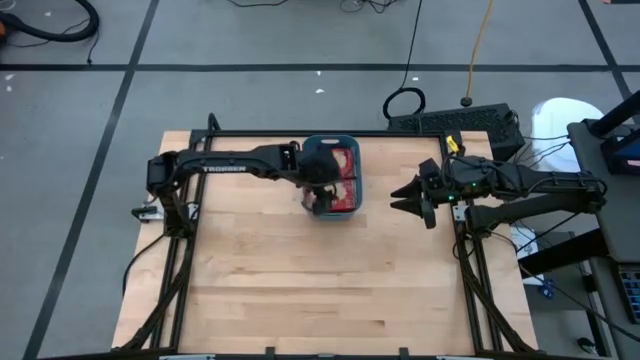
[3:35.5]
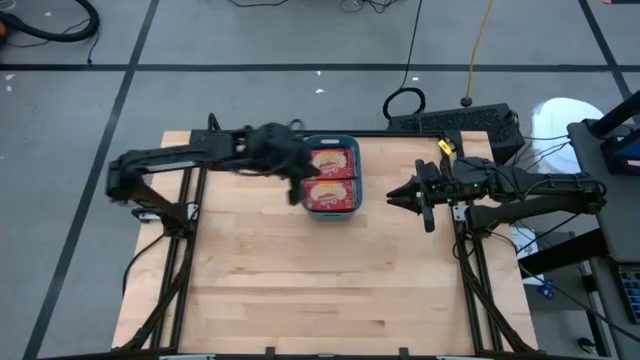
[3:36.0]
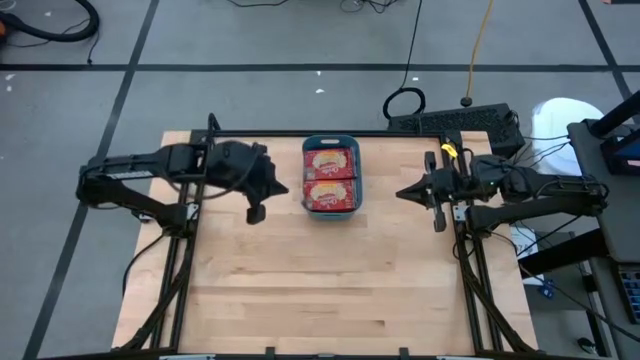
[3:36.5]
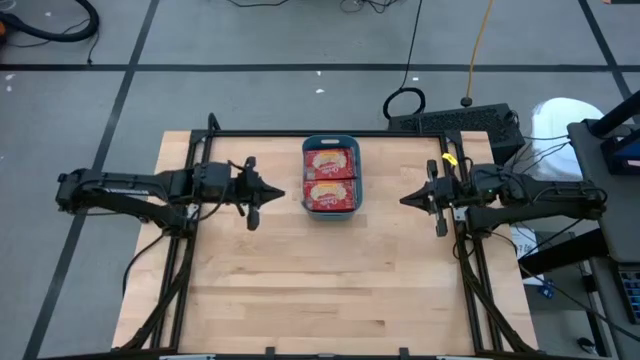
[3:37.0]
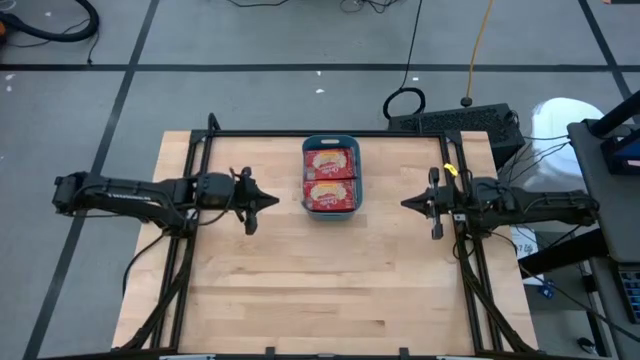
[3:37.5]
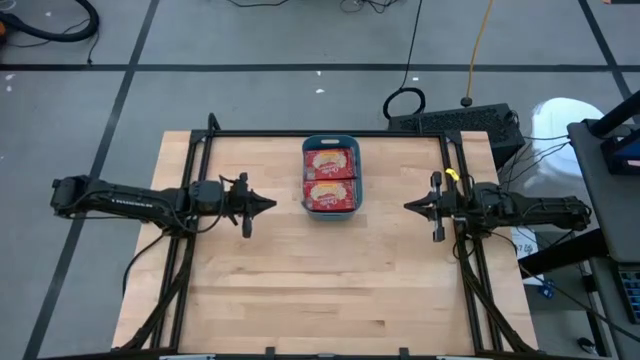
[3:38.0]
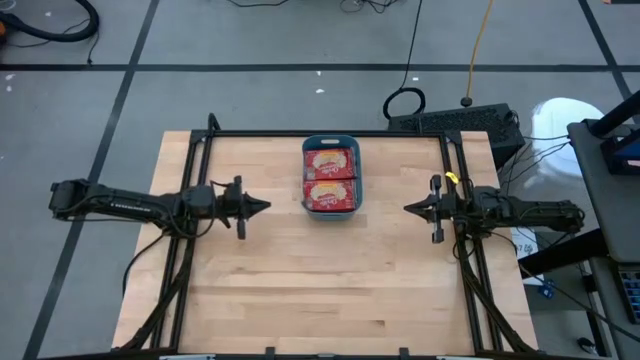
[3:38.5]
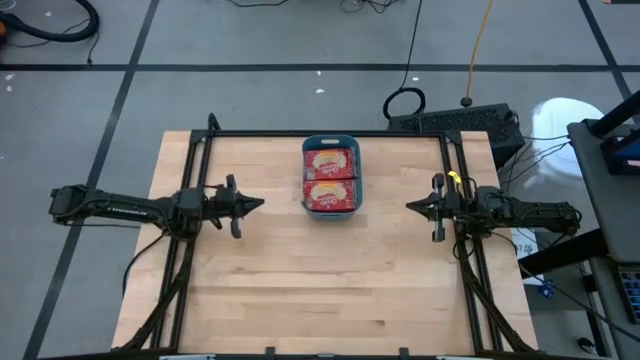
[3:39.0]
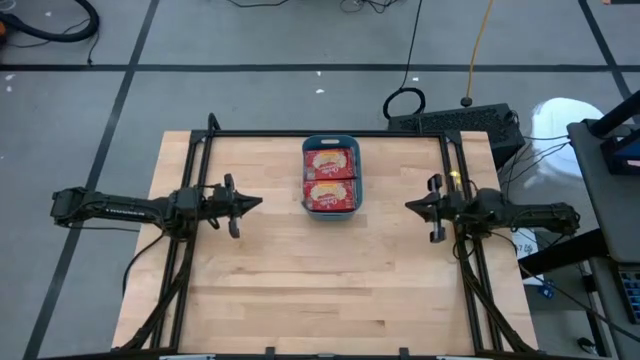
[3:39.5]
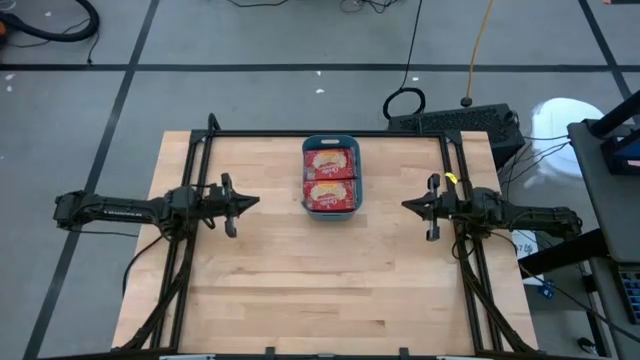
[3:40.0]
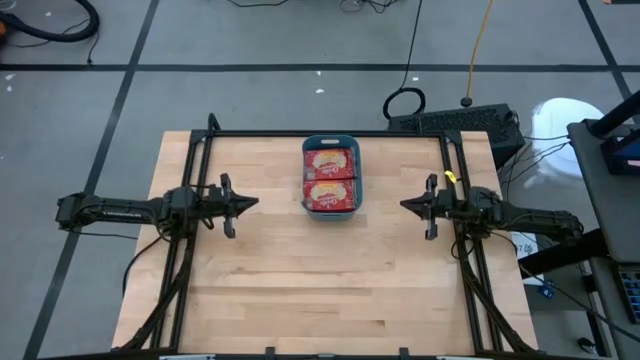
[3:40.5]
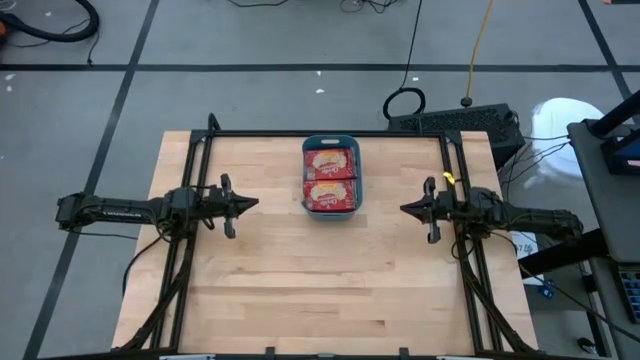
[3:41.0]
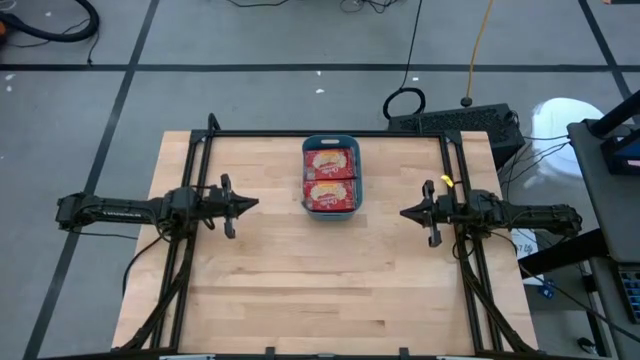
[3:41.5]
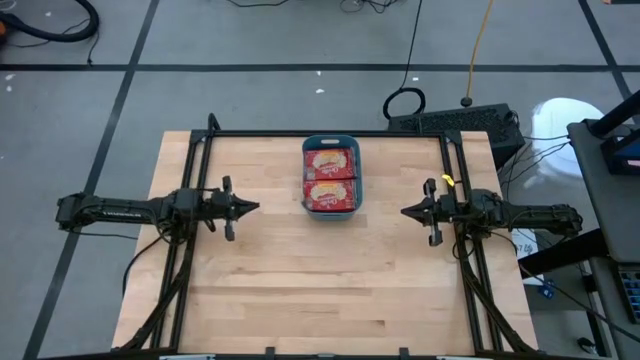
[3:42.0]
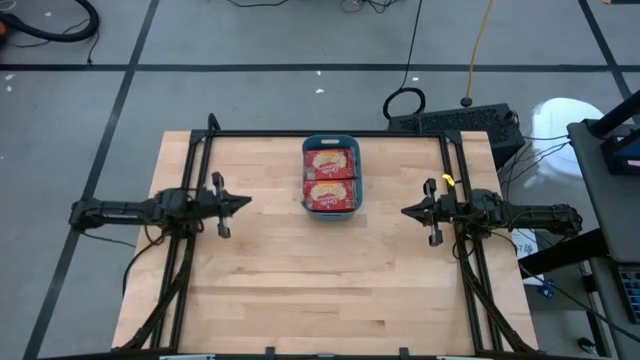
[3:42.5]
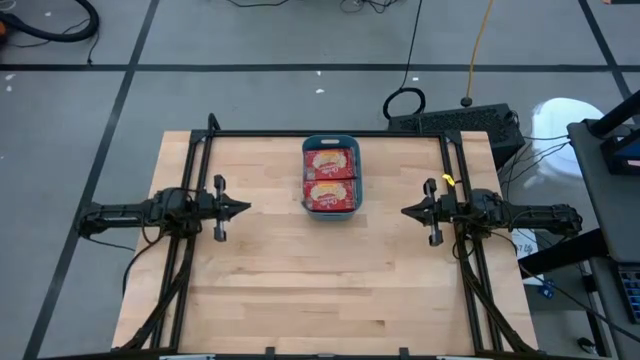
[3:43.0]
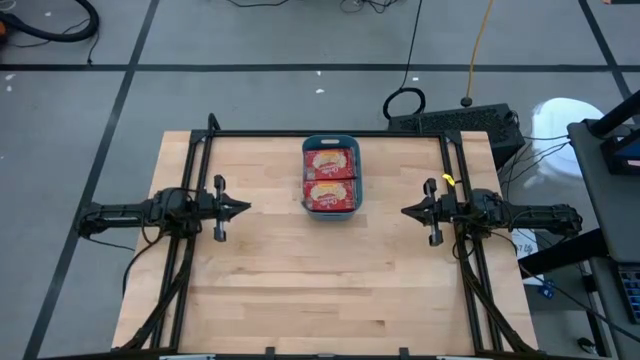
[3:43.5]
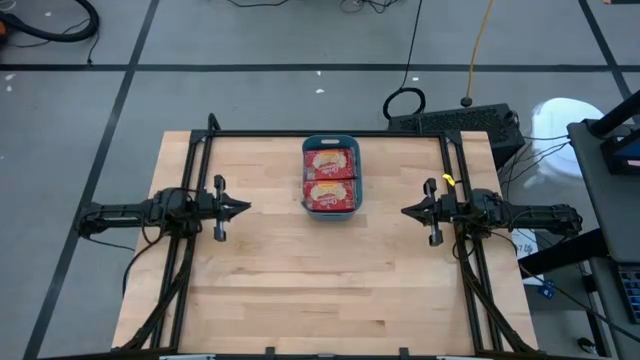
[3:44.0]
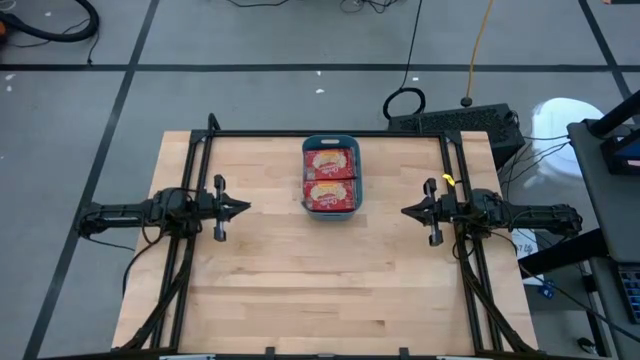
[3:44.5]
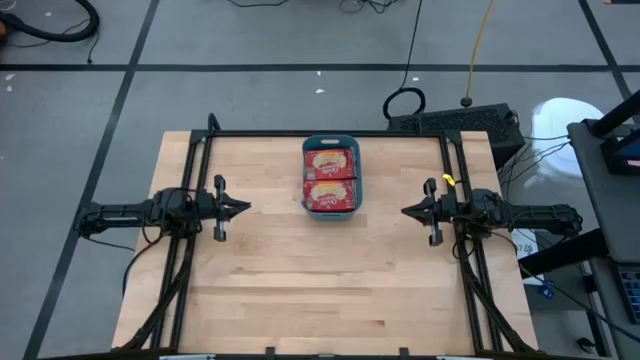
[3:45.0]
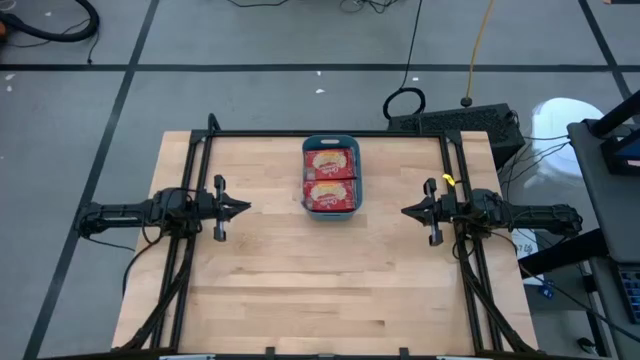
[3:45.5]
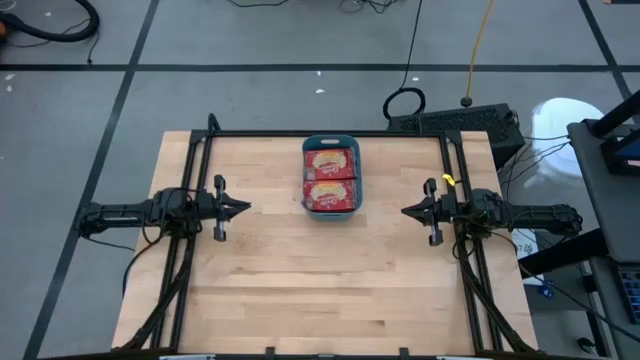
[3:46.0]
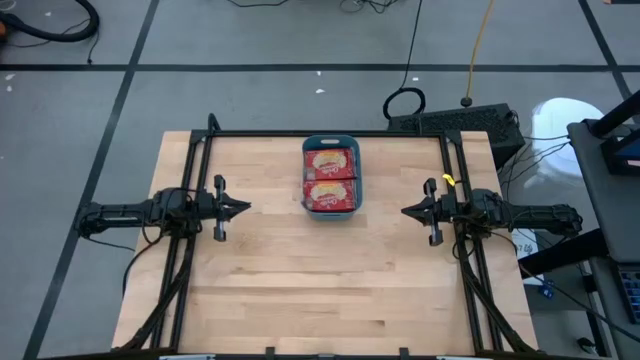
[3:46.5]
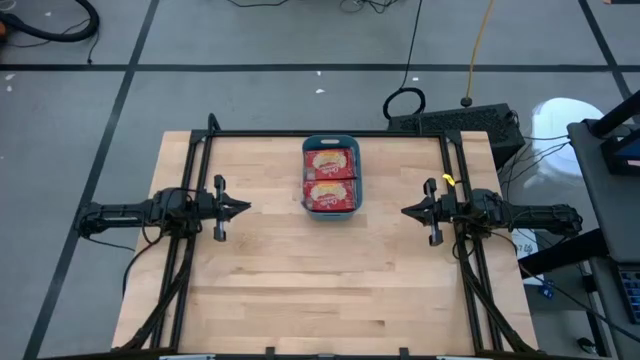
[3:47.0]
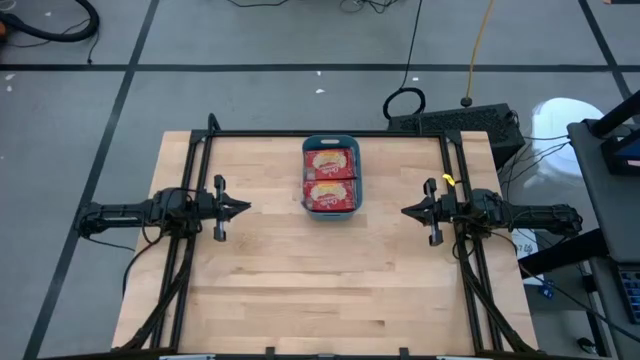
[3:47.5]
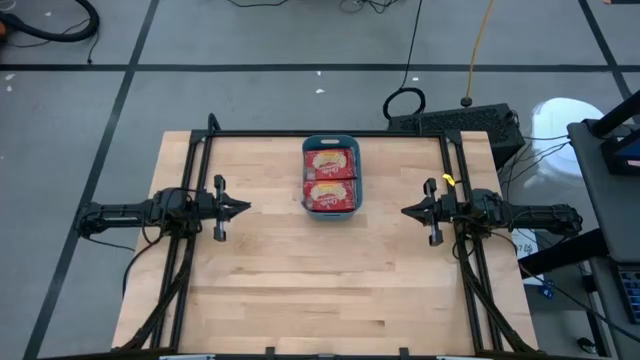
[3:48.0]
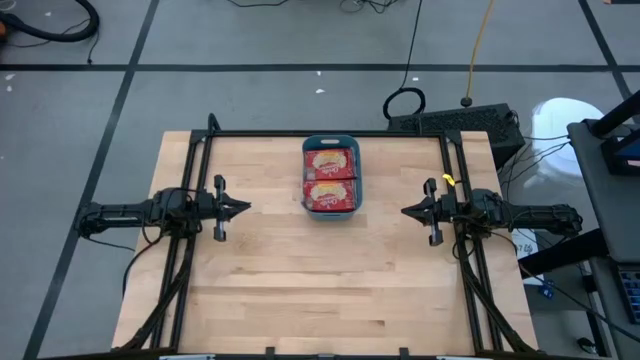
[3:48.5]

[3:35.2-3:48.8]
Task: Sort popcorn bags into baskets
Return to Home Position

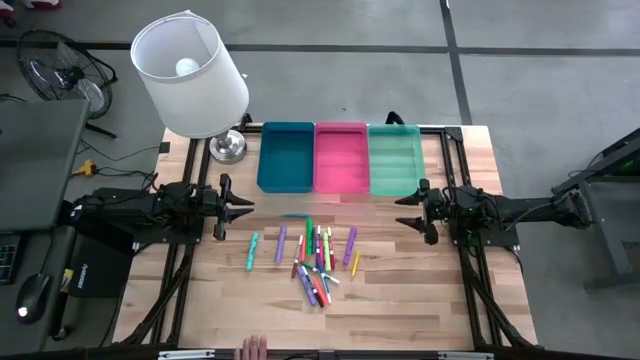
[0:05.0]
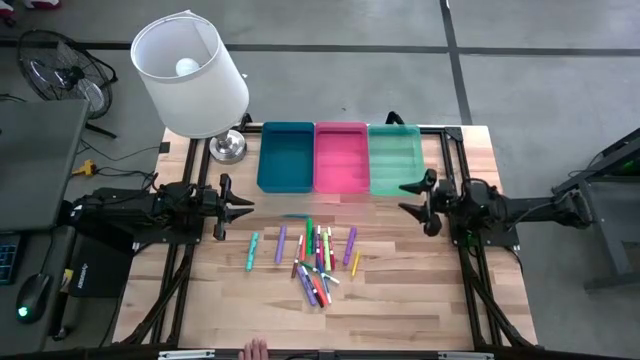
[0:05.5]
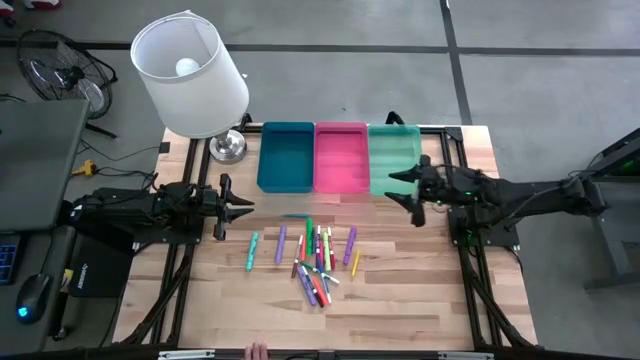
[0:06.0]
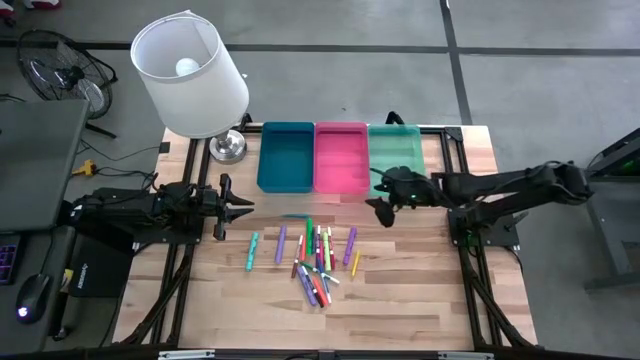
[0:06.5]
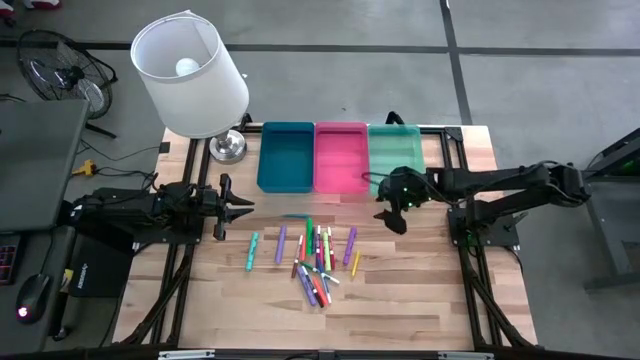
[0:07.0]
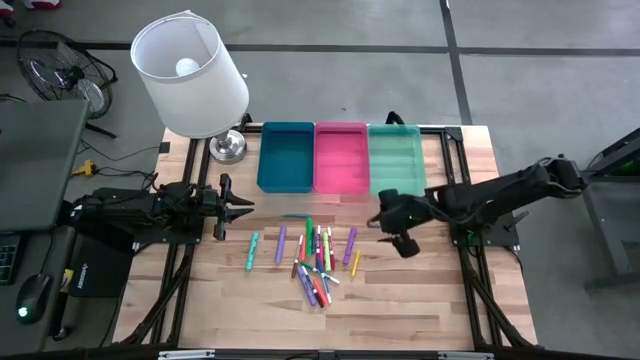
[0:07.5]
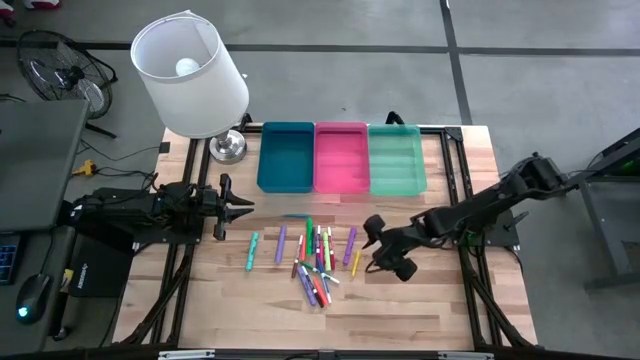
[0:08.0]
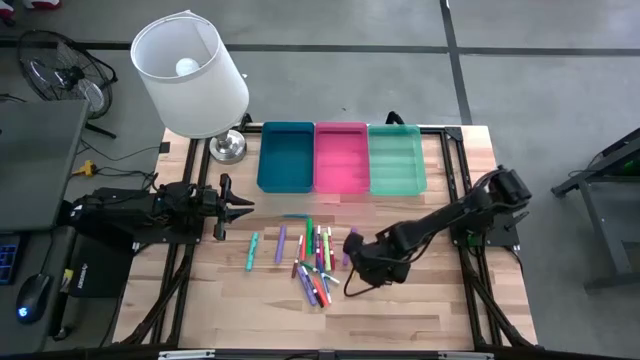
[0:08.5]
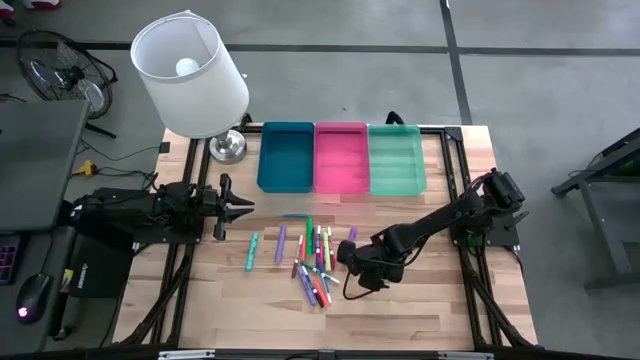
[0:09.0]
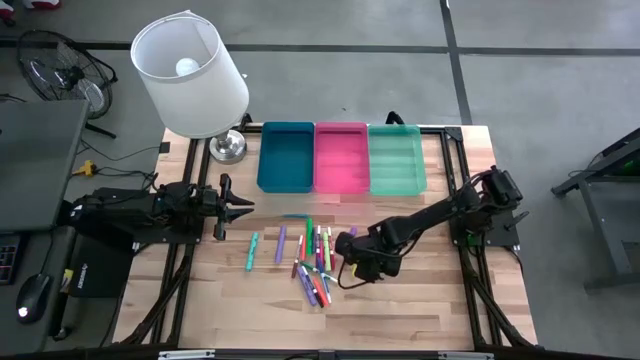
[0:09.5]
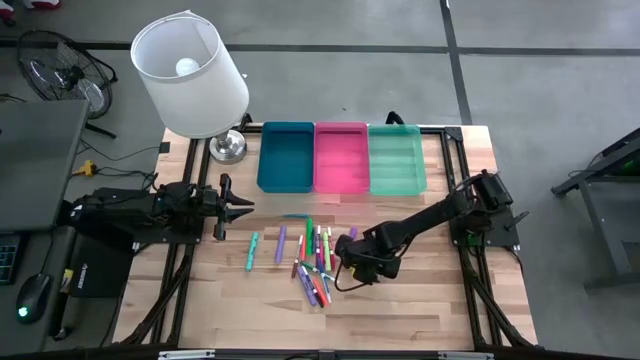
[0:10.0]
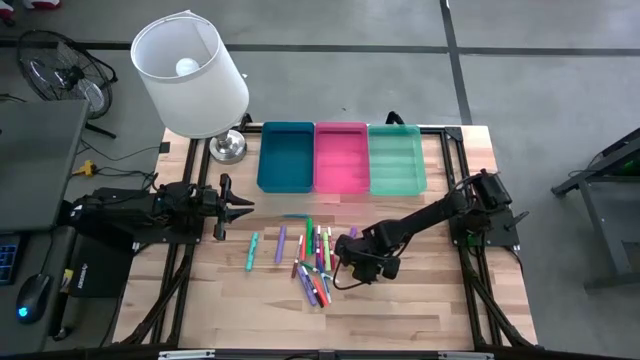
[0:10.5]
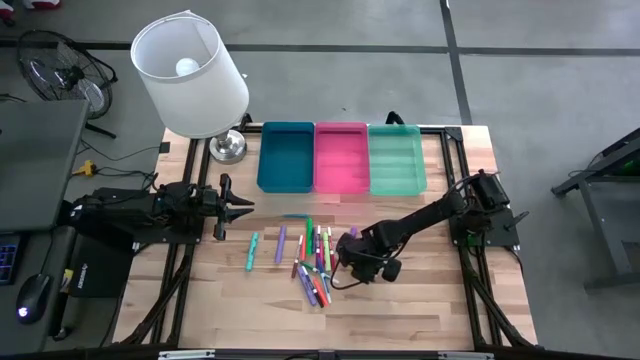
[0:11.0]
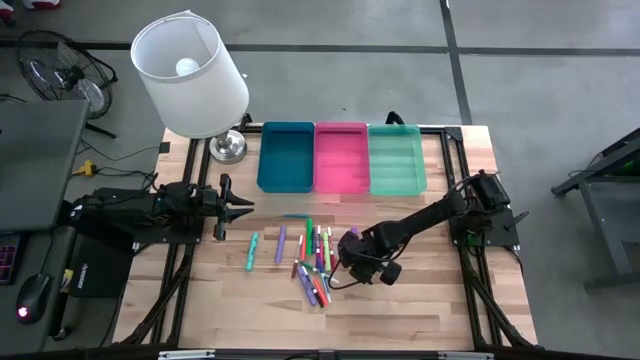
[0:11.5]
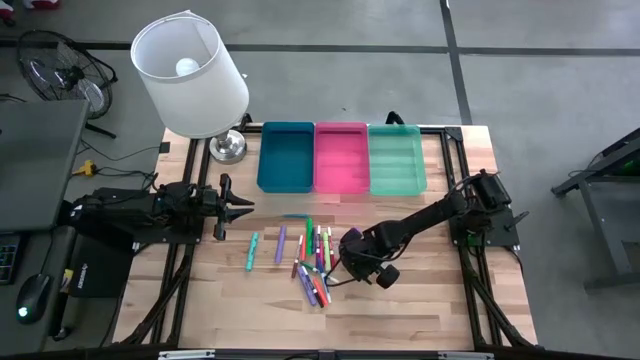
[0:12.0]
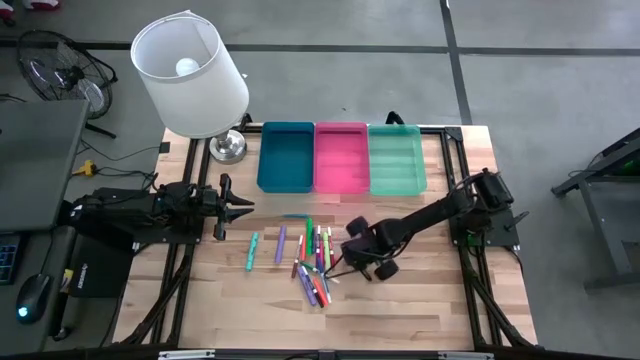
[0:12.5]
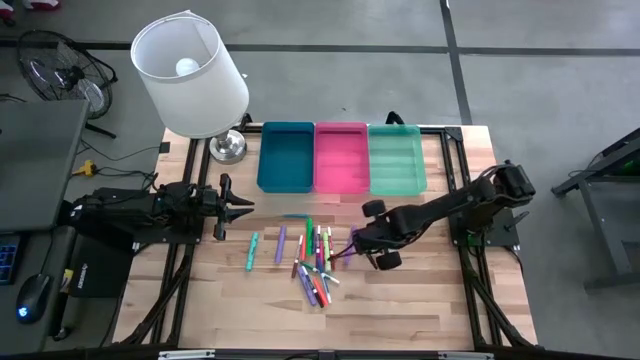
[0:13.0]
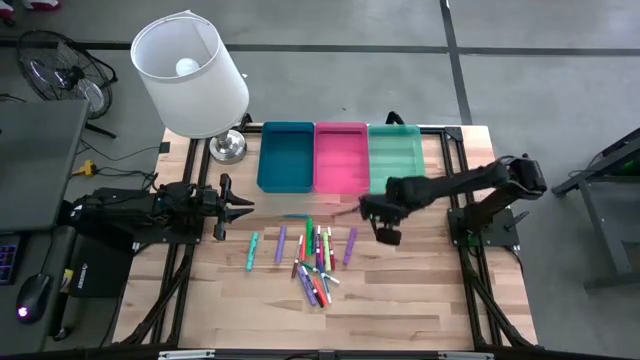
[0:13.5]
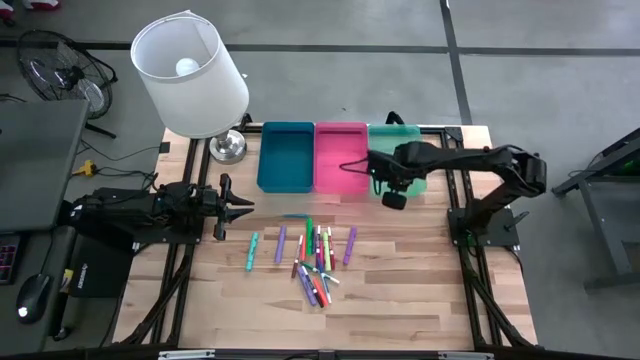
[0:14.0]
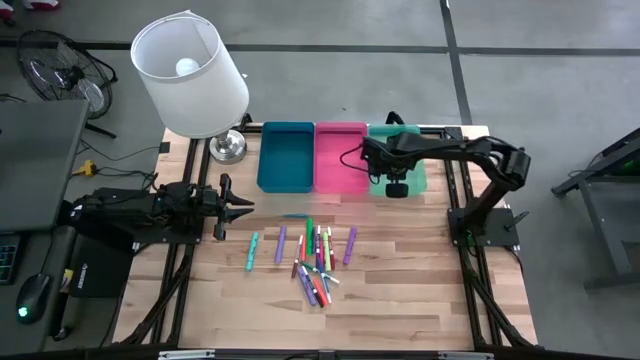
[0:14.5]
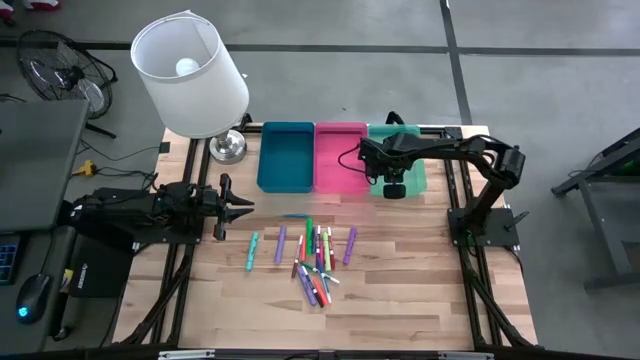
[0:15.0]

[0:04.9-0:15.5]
Task: Pick & Place Markers
Put the yellow highlighter into the light blue bin
